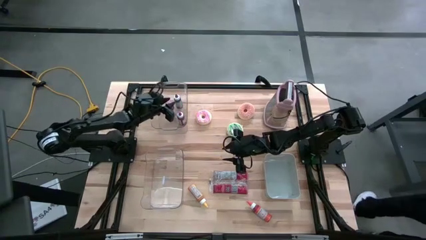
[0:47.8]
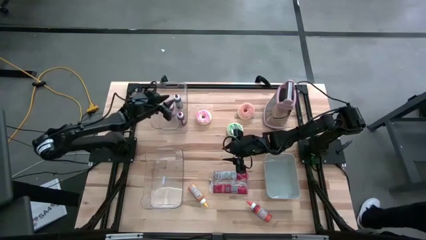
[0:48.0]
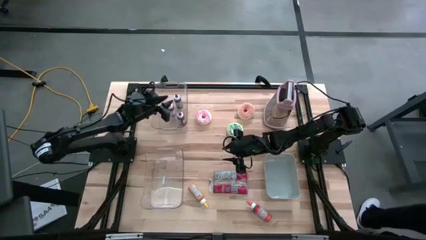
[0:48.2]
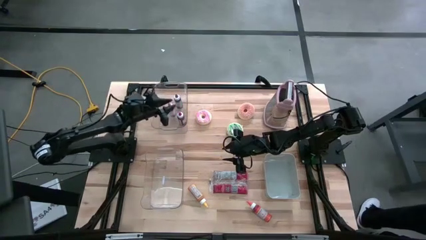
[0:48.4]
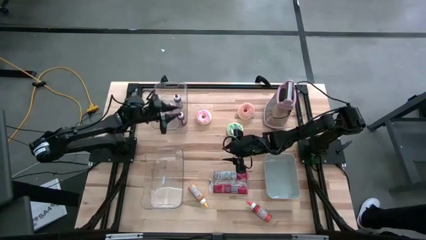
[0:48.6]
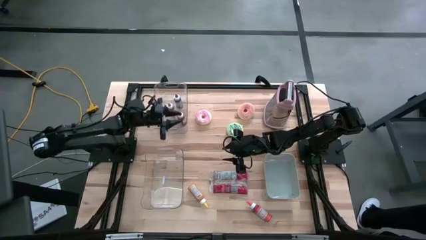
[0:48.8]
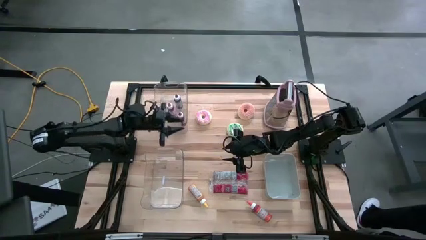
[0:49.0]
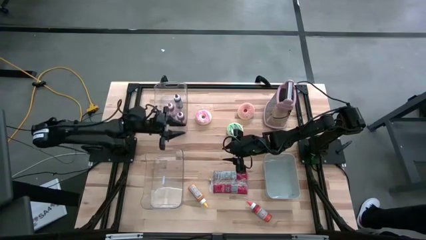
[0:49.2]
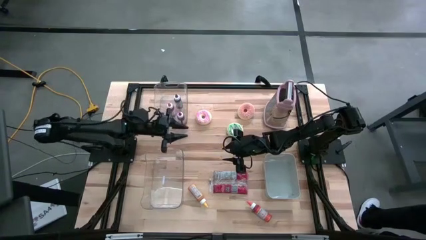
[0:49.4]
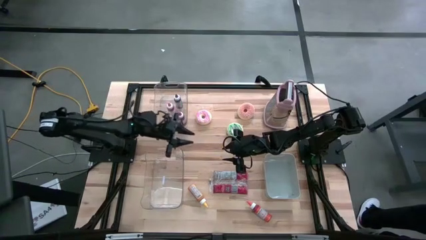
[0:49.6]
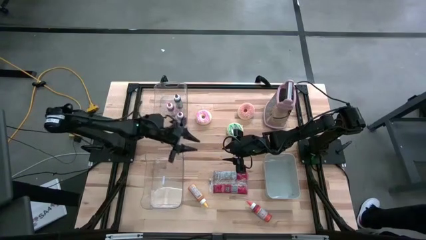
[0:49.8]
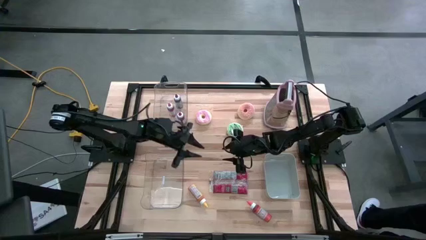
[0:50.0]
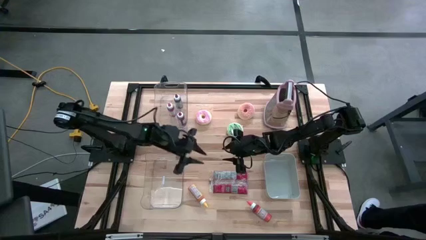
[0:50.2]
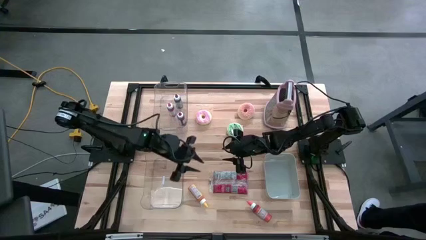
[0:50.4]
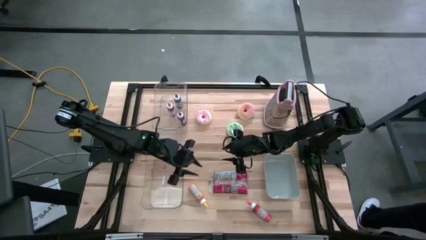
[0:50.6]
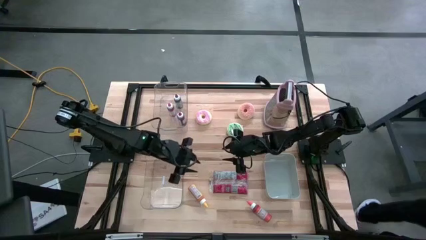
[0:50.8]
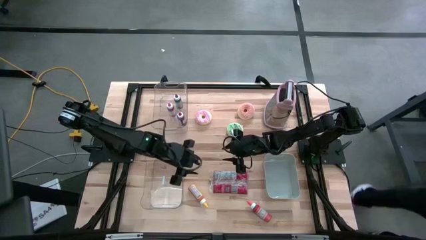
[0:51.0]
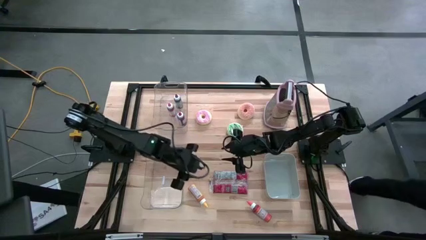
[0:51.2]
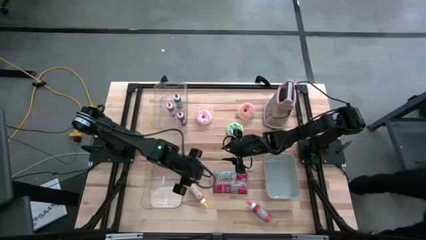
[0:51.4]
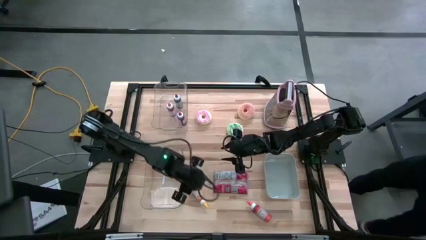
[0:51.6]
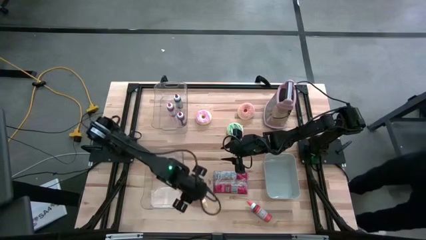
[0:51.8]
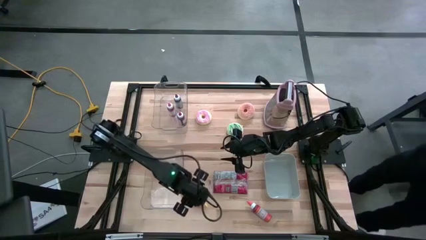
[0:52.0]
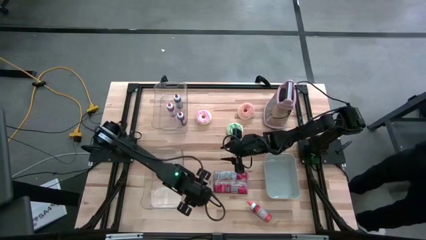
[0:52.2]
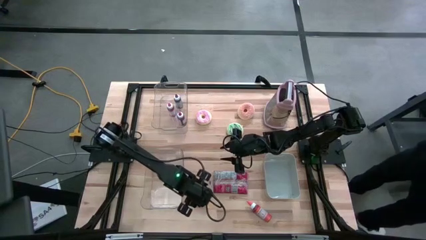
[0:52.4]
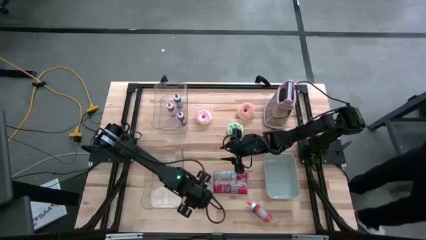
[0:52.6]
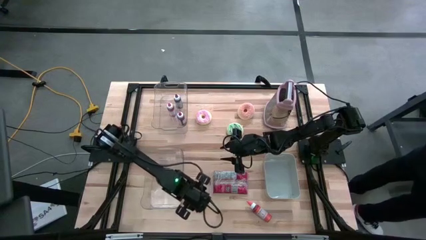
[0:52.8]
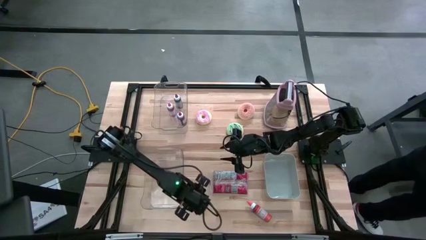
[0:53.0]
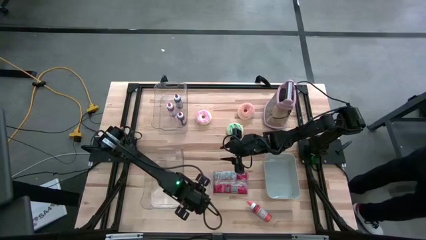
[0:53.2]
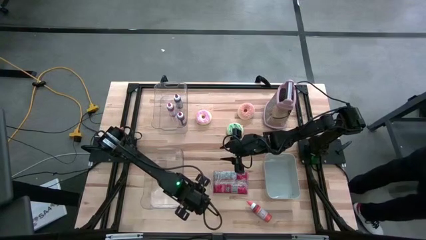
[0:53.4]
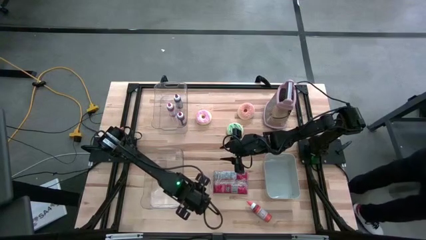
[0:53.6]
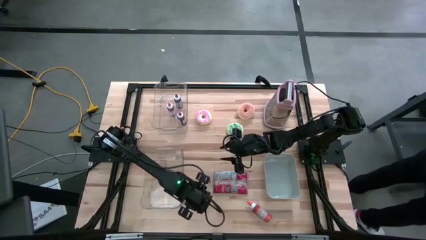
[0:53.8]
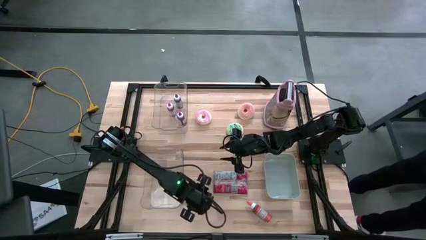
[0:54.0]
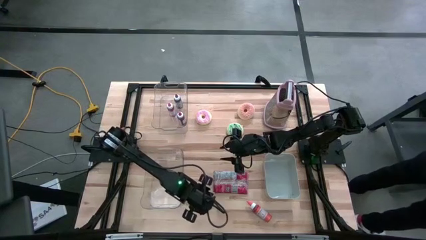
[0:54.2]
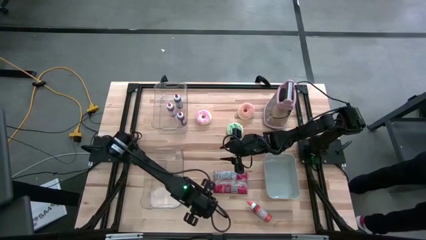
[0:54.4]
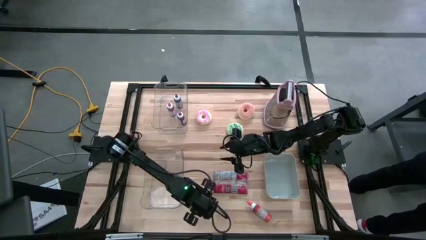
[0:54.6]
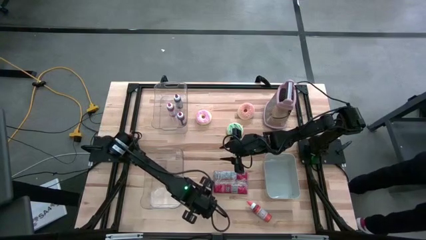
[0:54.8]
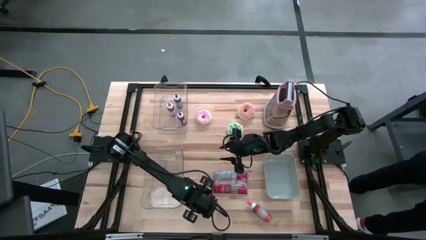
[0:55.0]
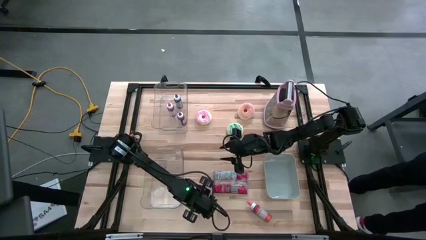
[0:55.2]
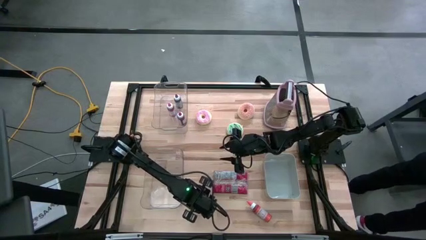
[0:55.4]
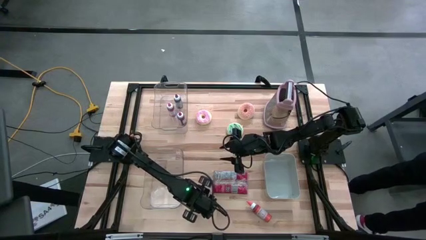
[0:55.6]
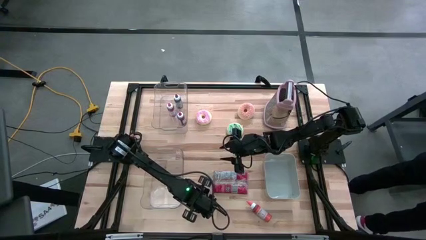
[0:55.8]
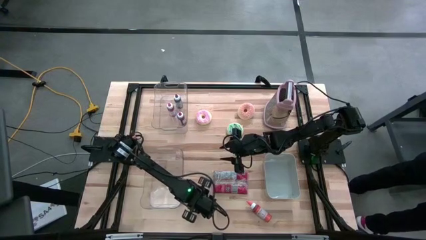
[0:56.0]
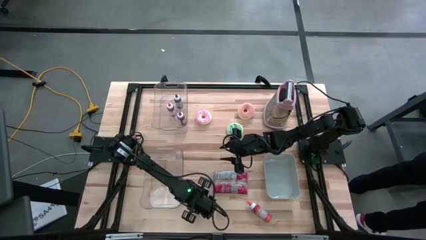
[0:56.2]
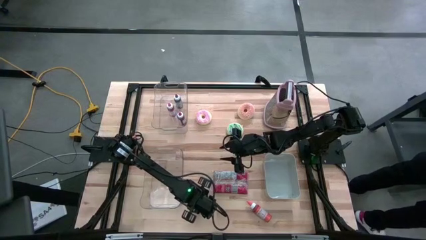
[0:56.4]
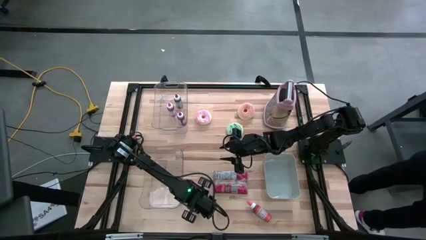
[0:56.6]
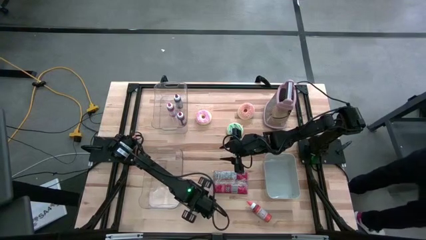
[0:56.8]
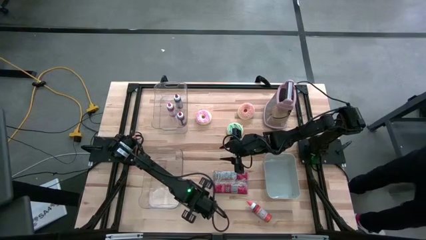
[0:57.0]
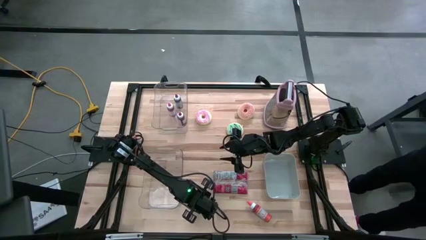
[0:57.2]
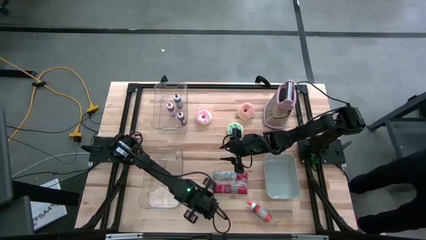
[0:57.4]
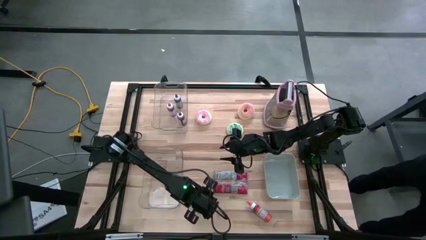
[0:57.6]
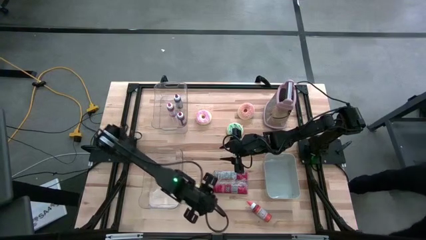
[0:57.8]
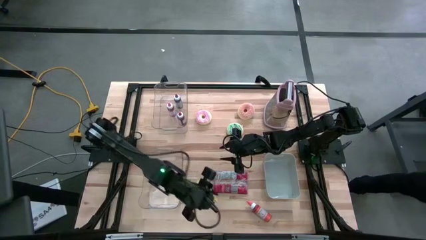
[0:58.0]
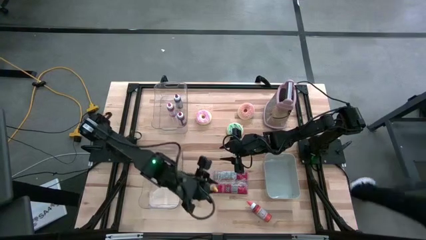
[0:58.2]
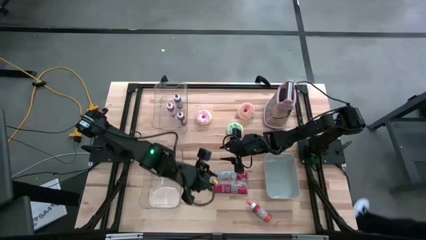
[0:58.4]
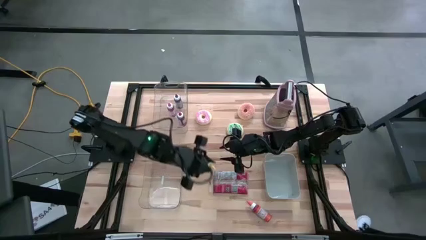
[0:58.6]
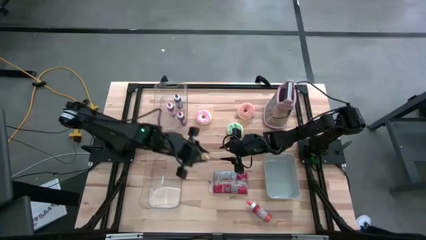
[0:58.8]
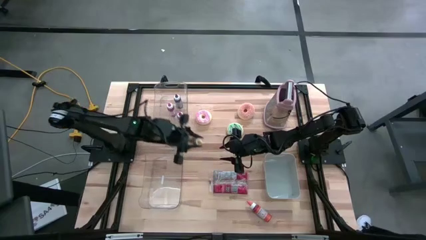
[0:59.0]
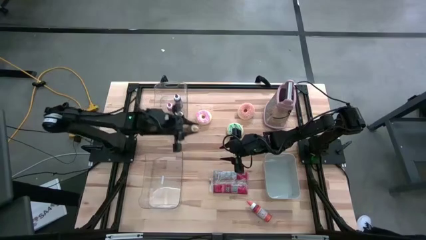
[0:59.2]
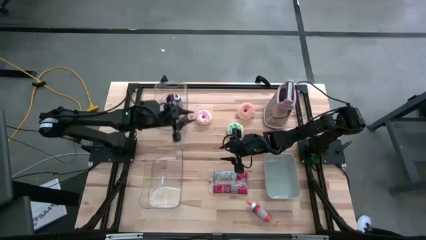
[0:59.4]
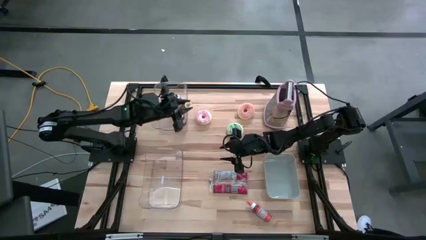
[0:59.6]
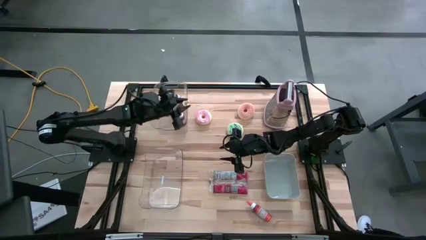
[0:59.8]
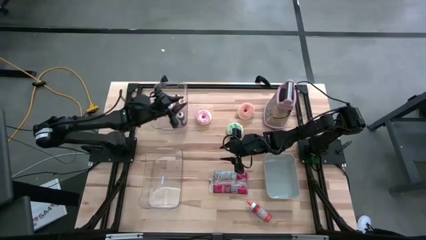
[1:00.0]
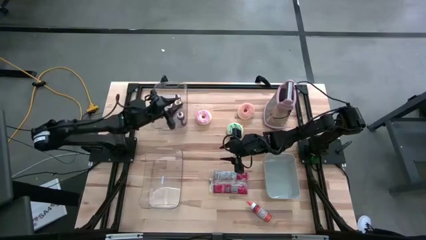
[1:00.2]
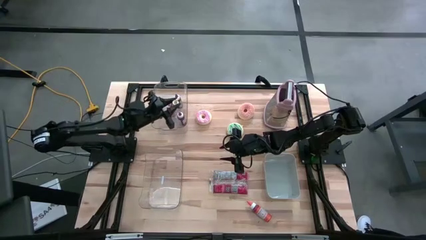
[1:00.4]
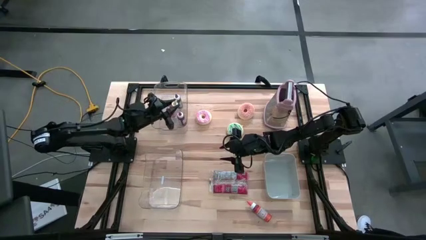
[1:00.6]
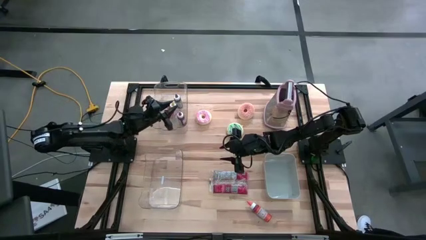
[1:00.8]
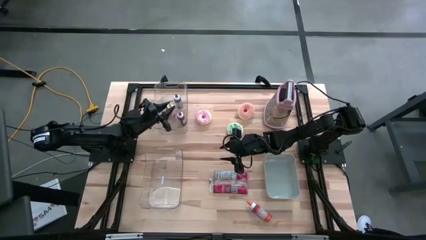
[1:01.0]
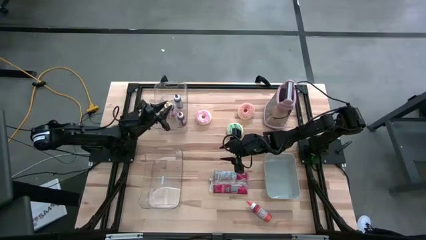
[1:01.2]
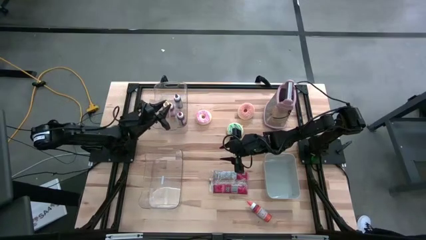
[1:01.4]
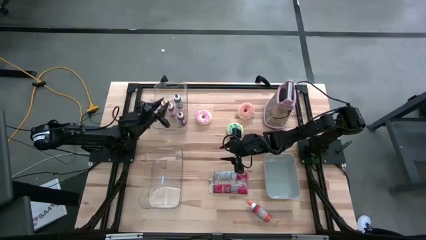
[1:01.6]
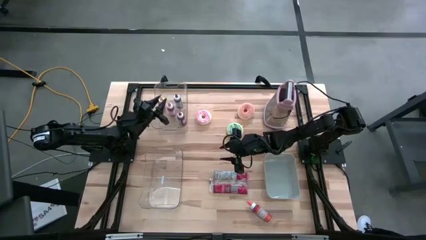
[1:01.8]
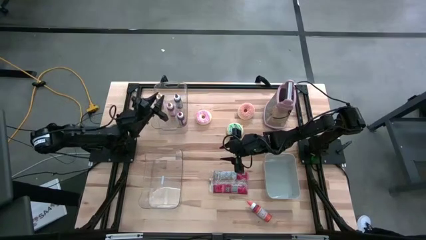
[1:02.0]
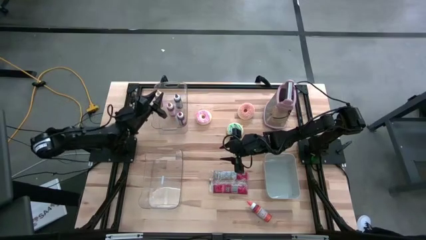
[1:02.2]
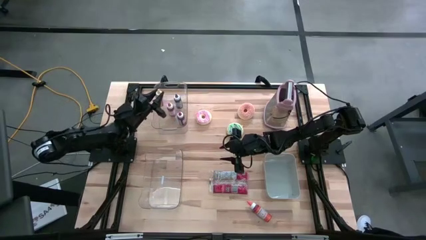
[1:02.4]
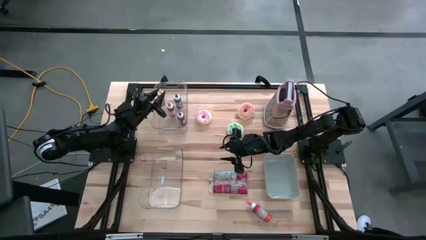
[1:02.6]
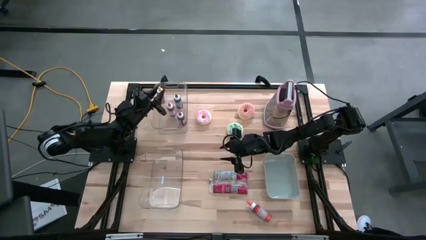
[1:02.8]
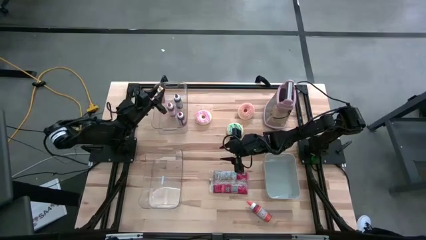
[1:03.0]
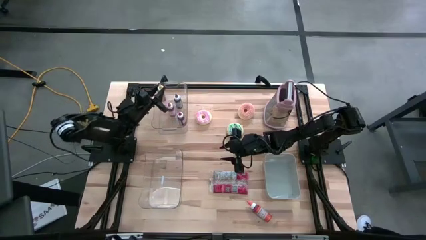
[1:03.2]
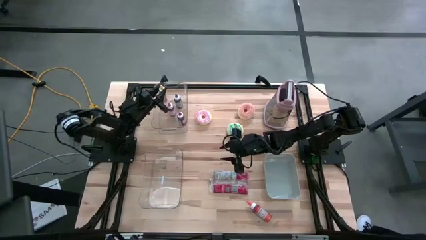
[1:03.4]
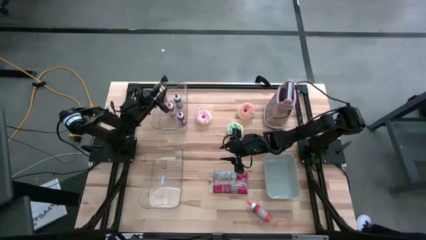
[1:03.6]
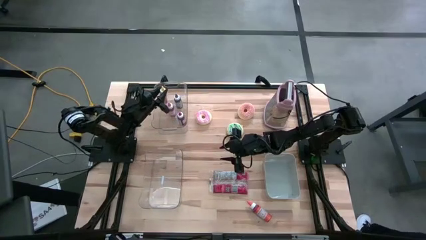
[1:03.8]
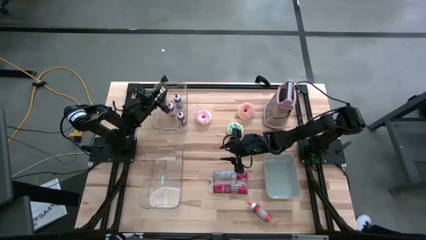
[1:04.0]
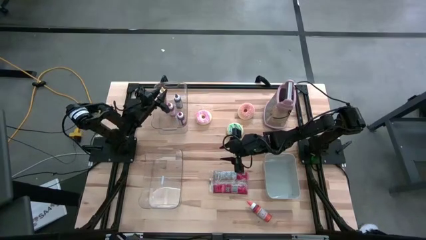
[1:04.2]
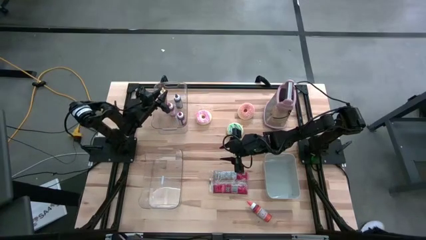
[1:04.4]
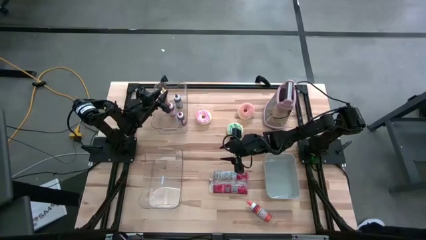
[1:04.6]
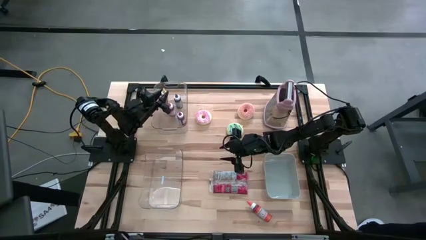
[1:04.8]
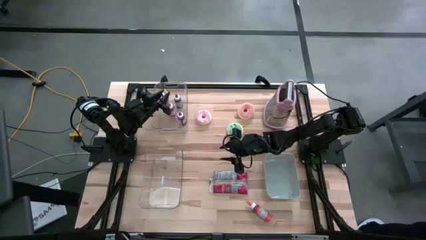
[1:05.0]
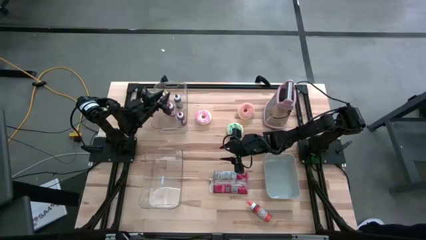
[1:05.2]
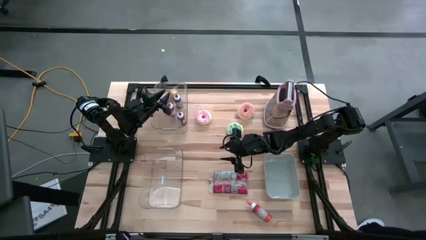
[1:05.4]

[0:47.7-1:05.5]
Put the yellow food coloring bottle into the top transparent bin
